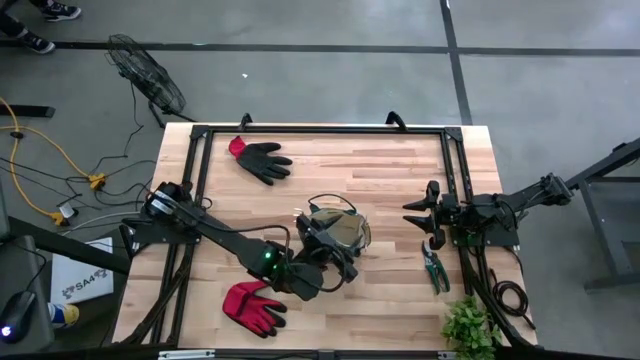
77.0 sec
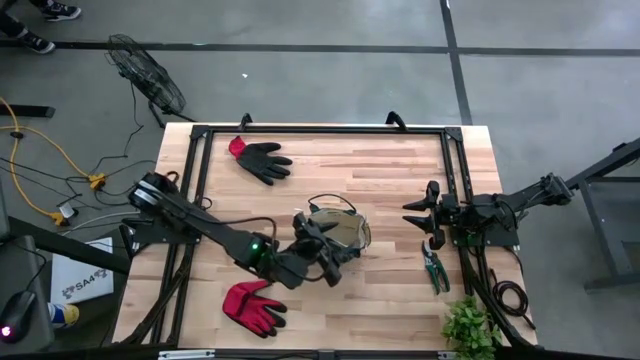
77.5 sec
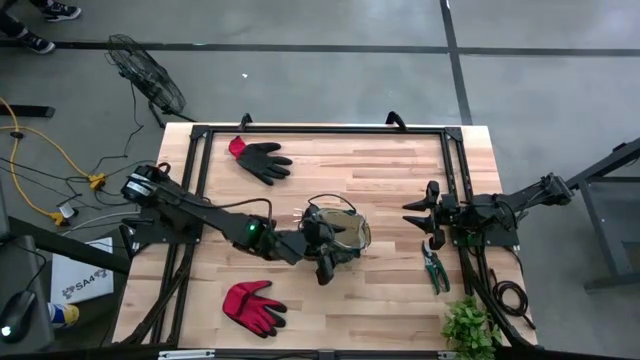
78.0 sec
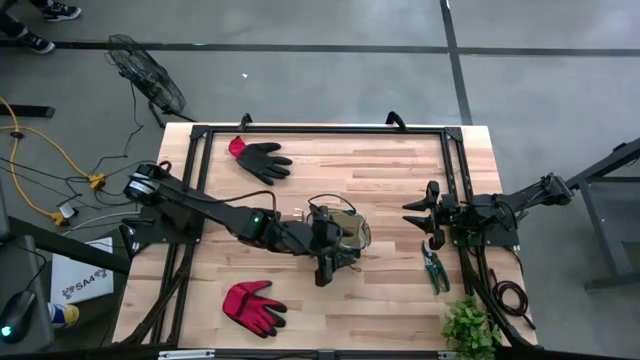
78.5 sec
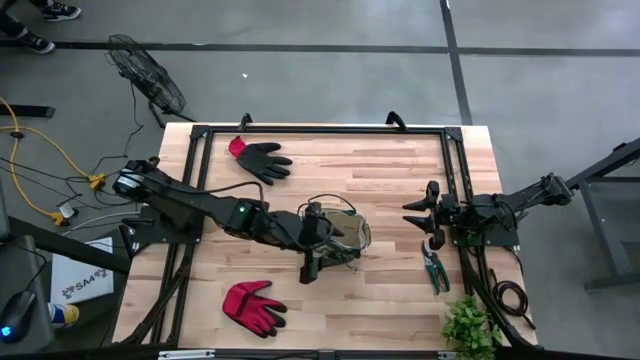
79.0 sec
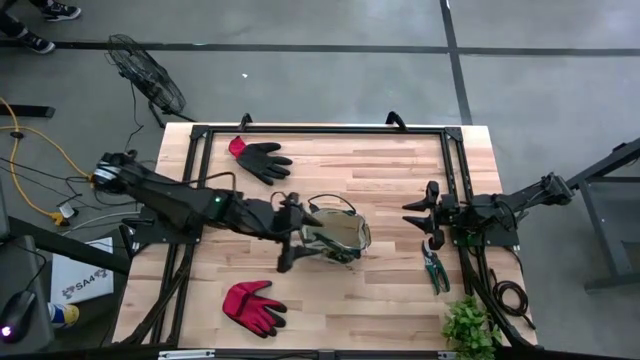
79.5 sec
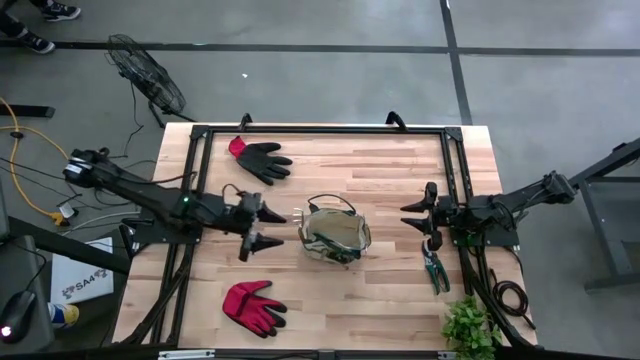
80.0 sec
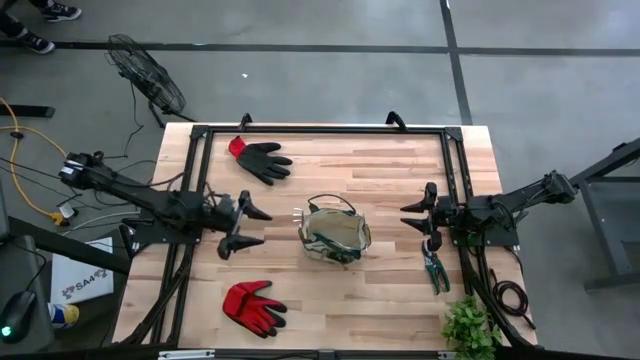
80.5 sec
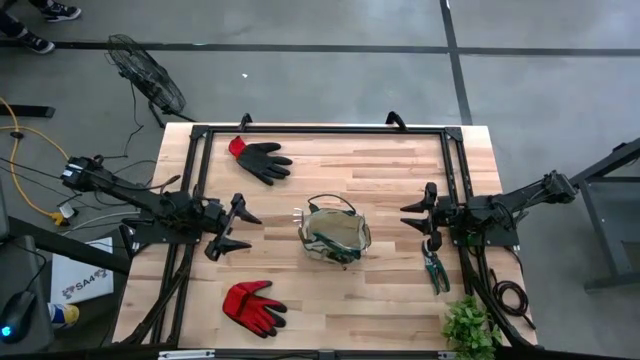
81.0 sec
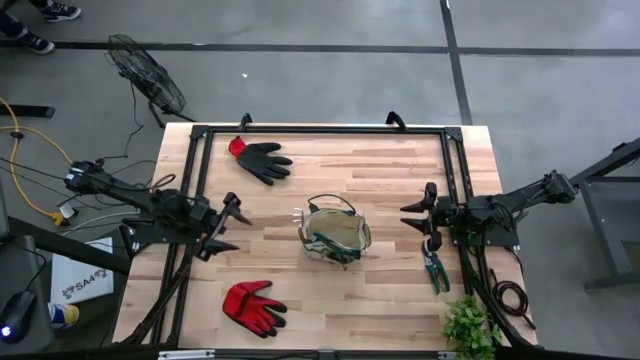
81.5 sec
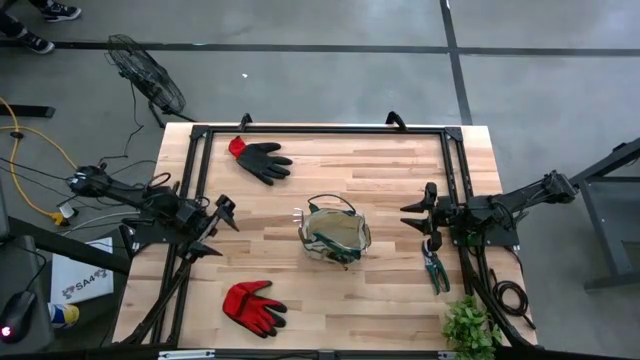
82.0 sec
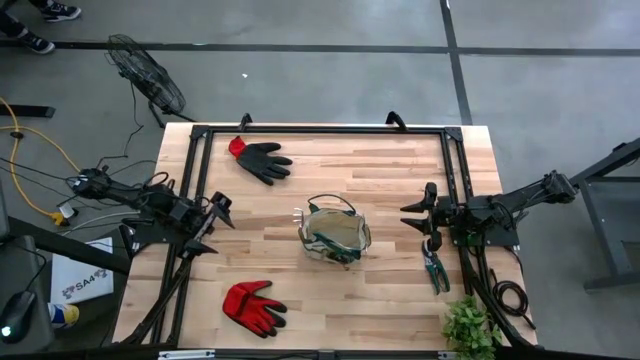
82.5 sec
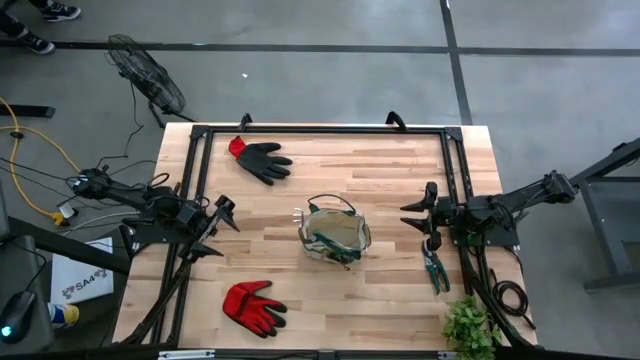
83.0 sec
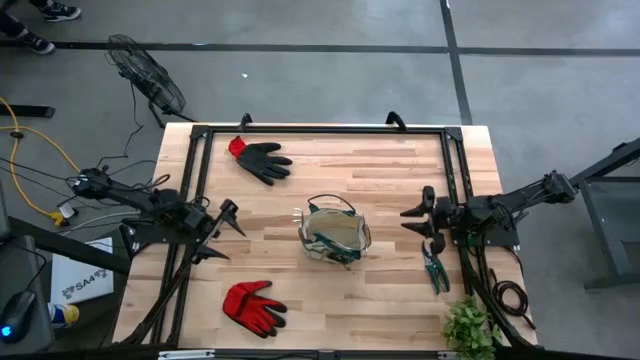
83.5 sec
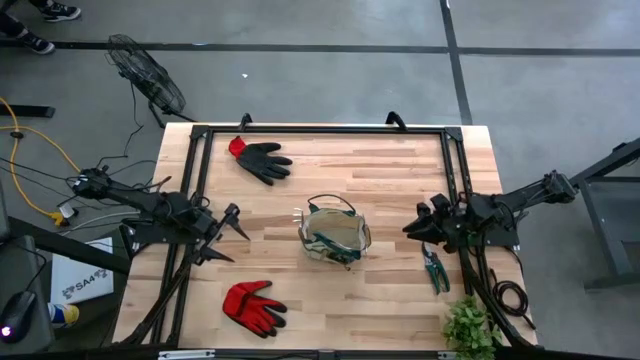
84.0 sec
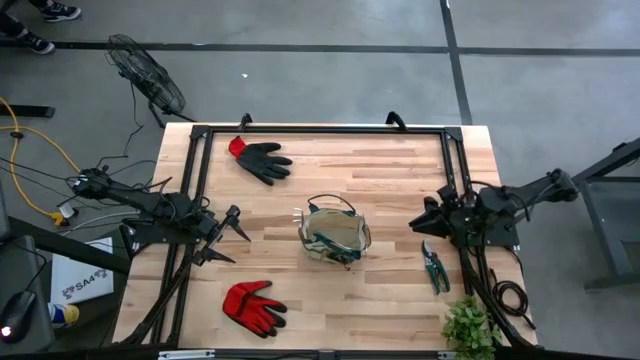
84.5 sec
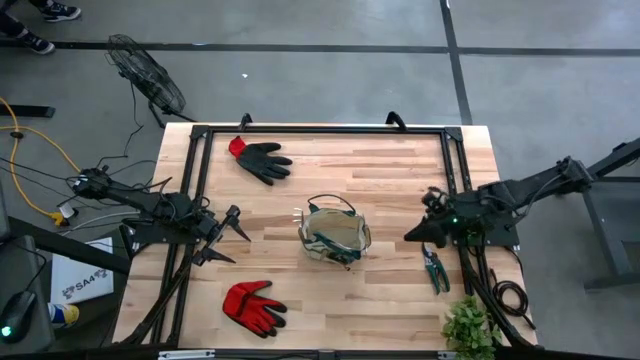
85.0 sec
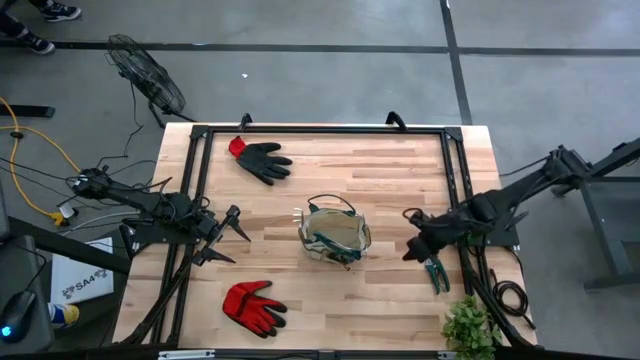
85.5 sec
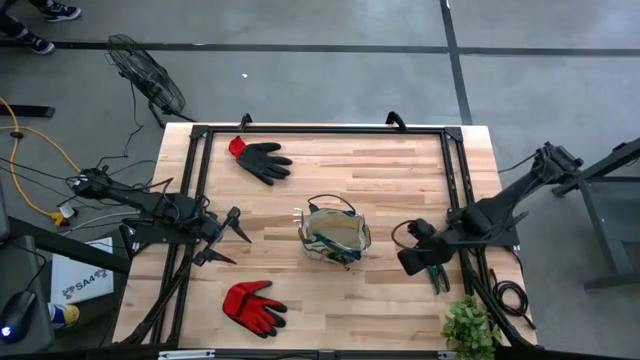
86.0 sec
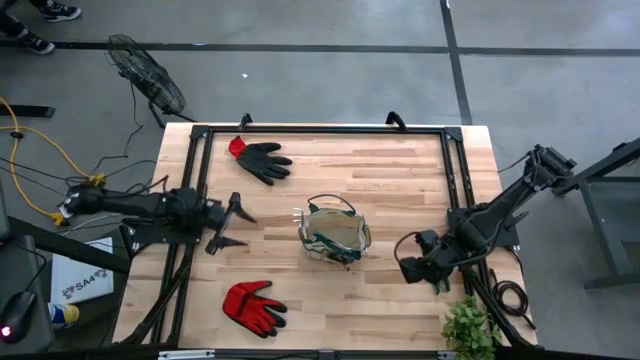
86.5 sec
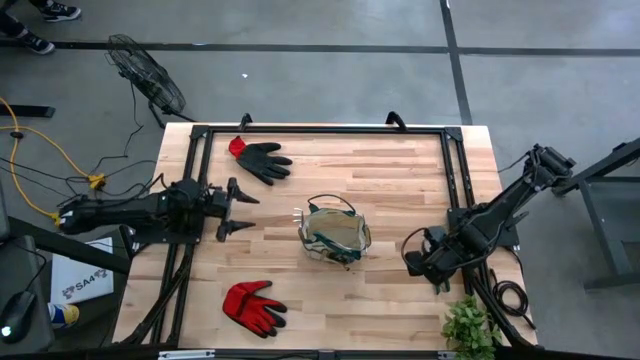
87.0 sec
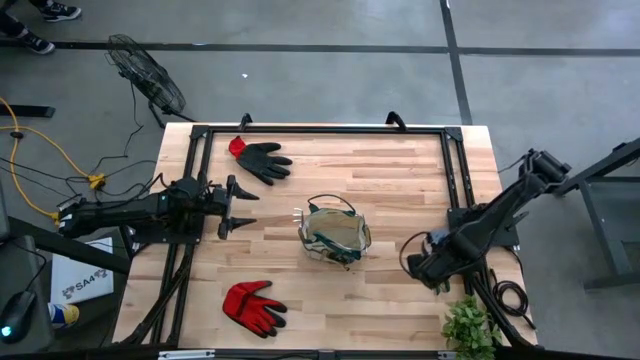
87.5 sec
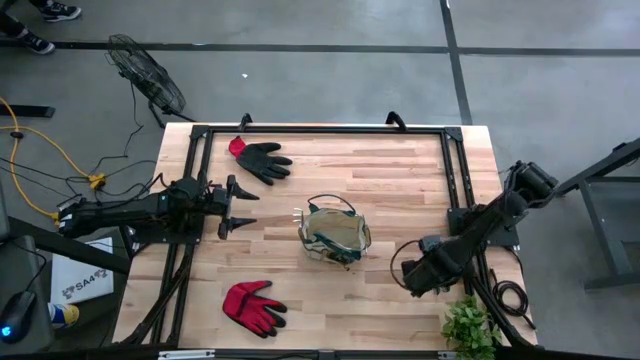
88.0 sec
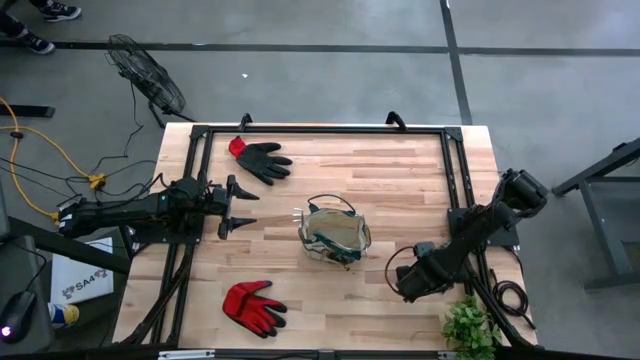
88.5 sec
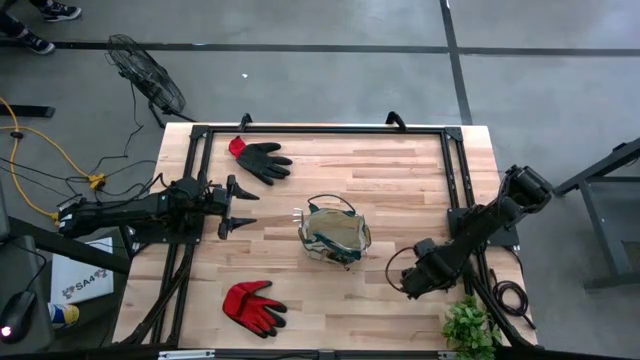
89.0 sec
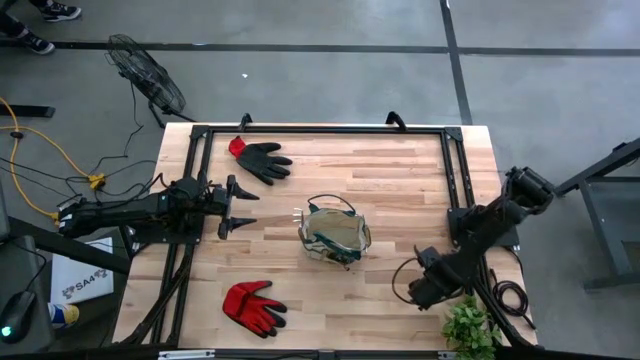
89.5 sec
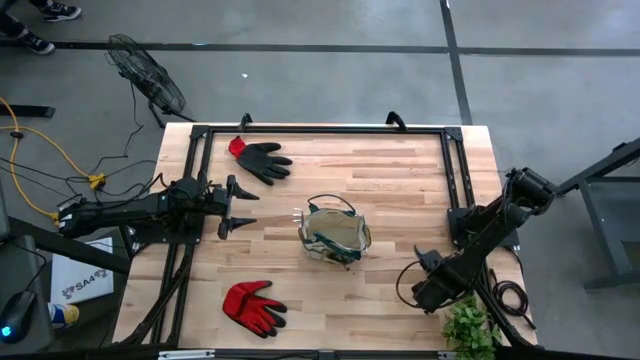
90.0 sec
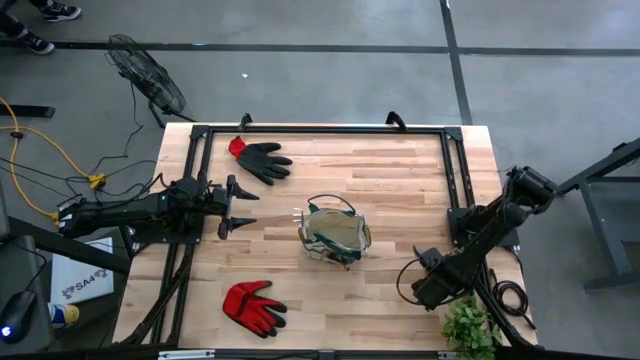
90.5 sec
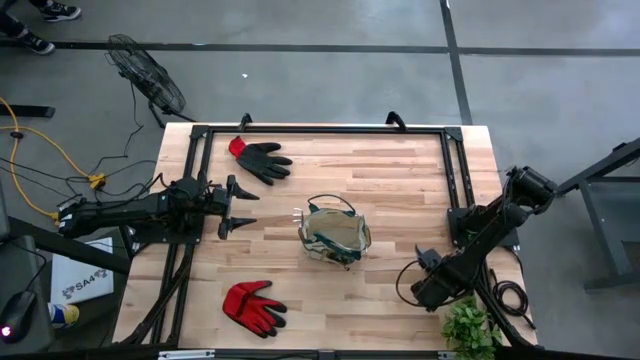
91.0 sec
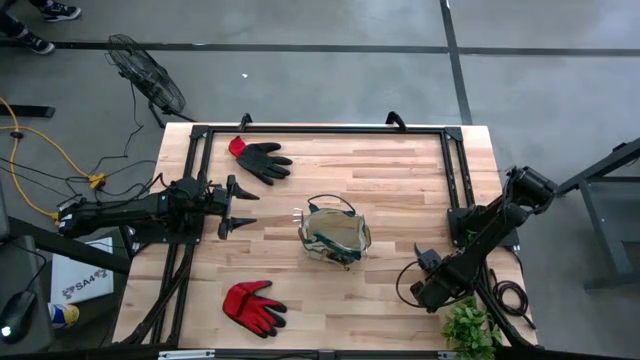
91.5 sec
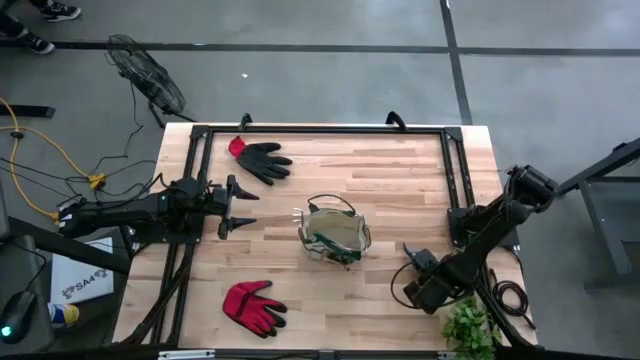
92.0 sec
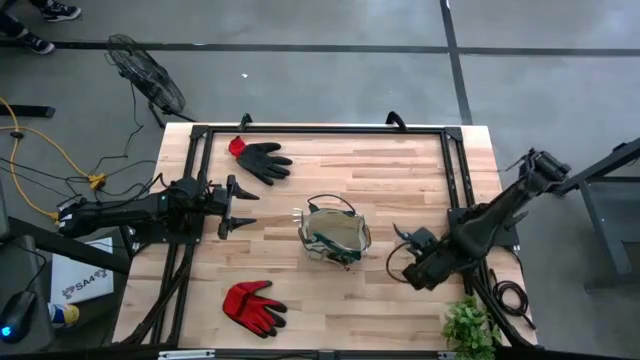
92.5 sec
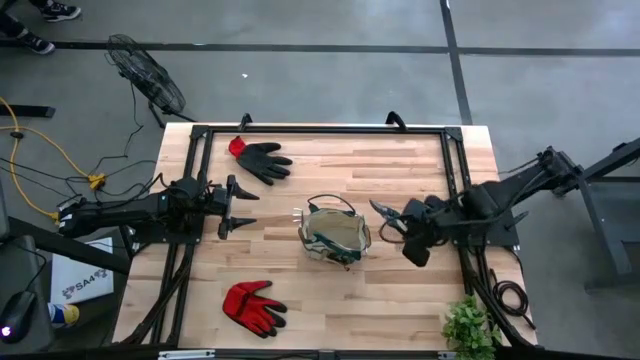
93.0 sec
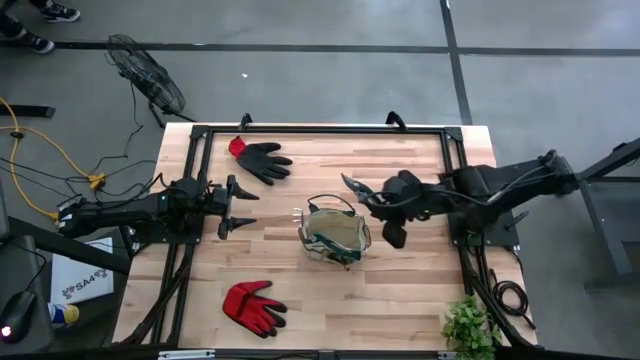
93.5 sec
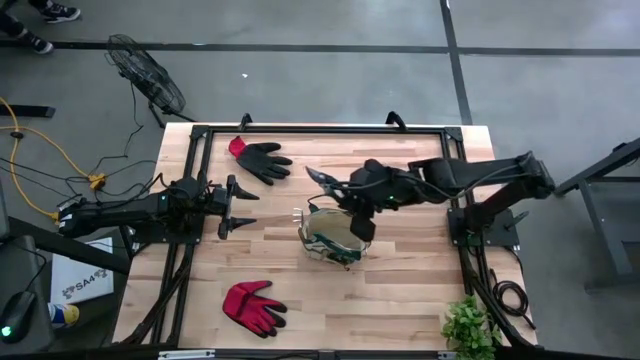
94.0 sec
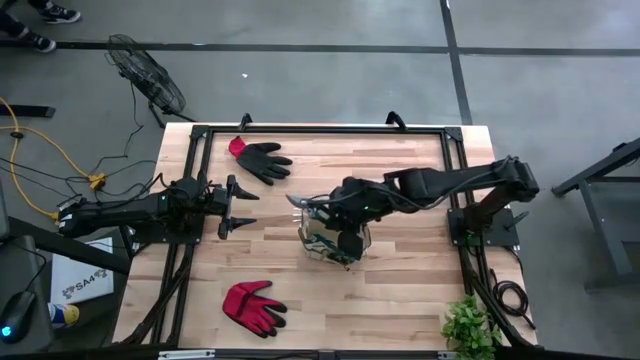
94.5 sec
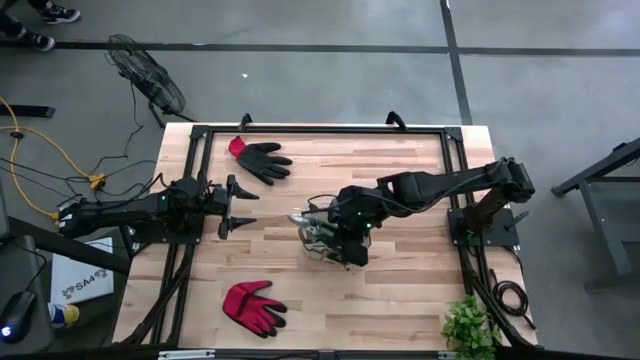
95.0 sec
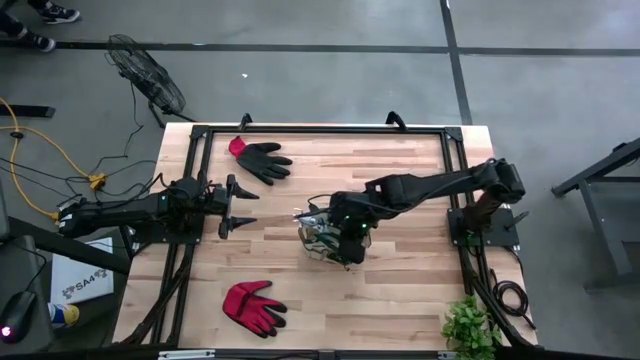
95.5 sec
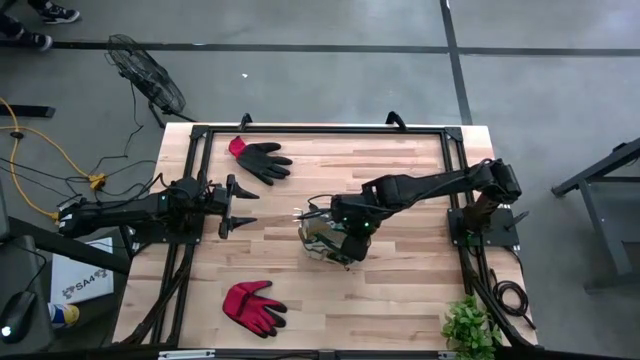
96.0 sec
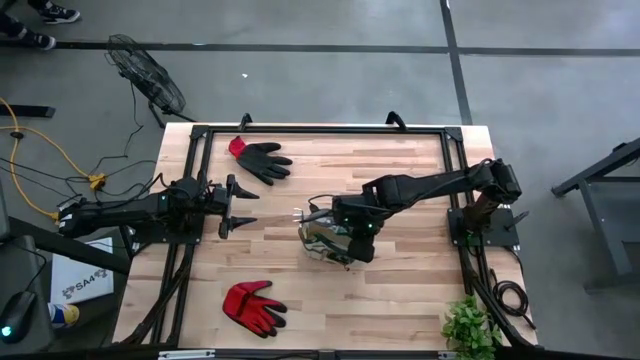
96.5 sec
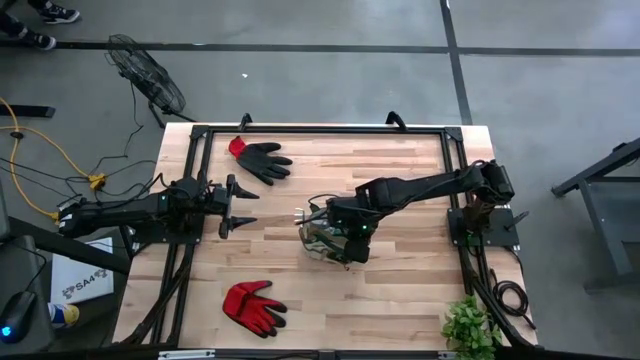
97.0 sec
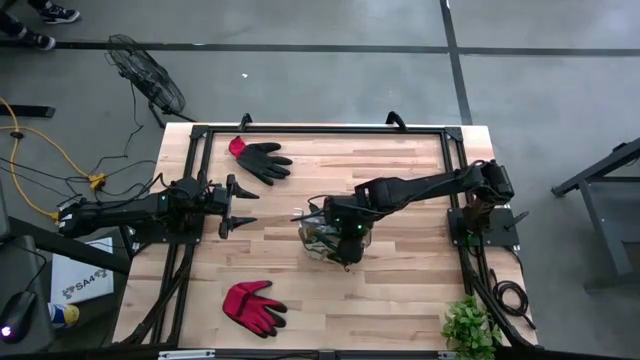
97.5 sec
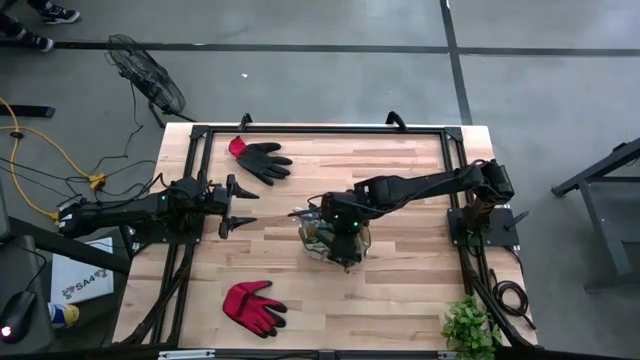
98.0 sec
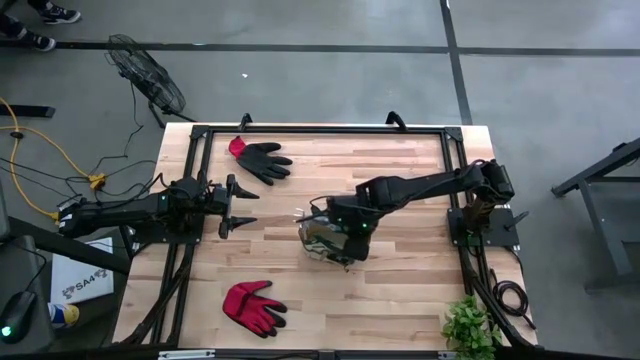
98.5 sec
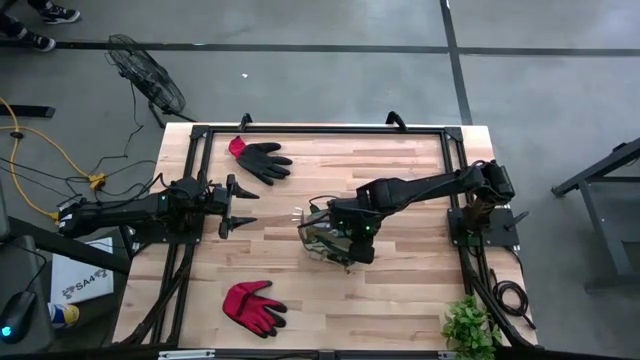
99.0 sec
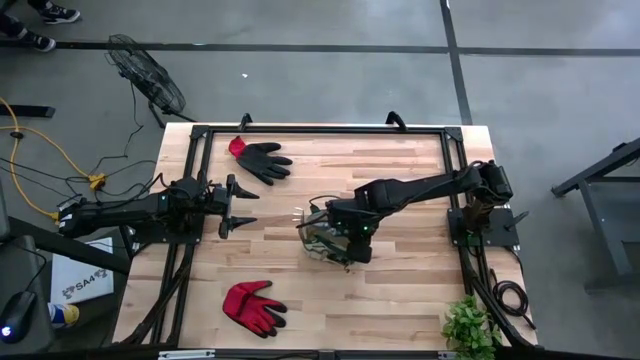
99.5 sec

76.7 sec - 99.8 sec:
Task: Pick & Place Garden tools in Gardening bag
Put the green shear scissors into the gardening bag
